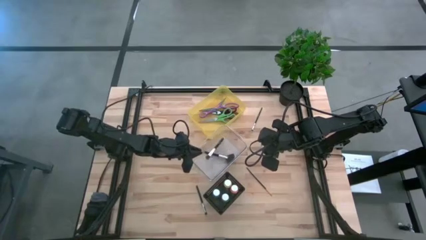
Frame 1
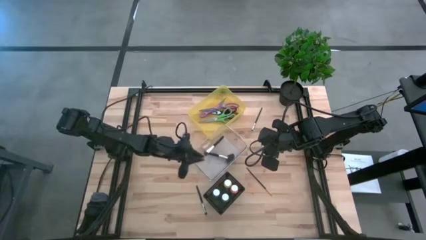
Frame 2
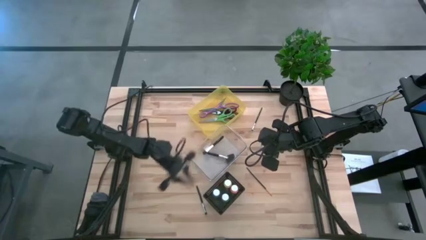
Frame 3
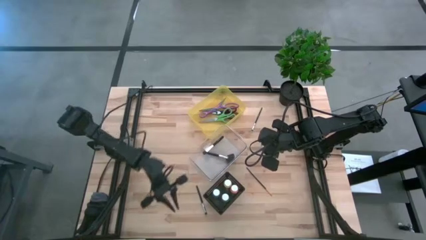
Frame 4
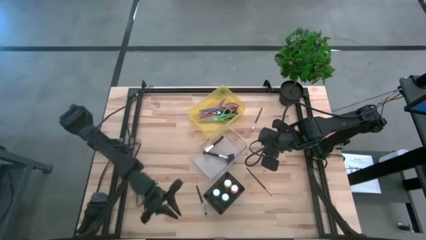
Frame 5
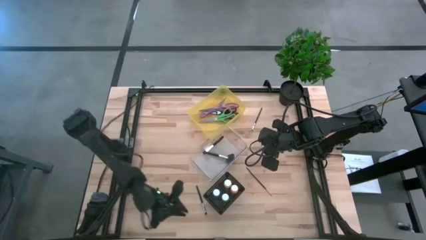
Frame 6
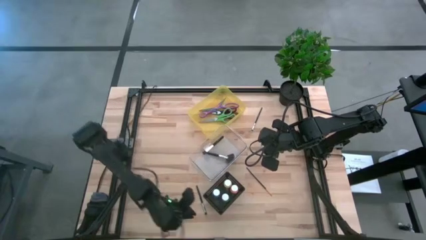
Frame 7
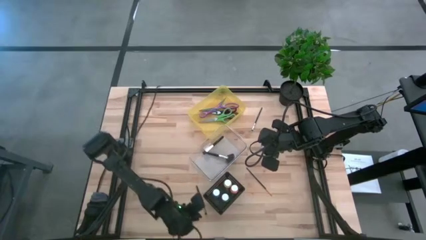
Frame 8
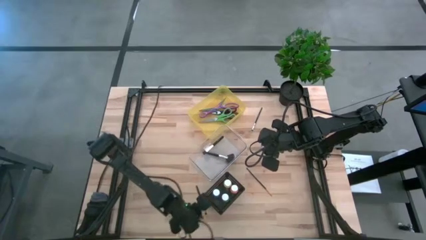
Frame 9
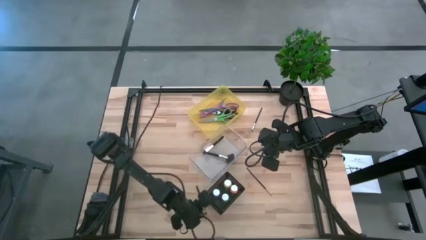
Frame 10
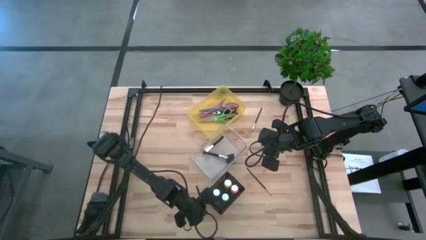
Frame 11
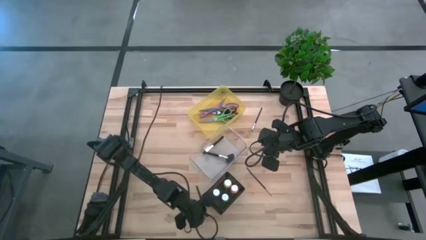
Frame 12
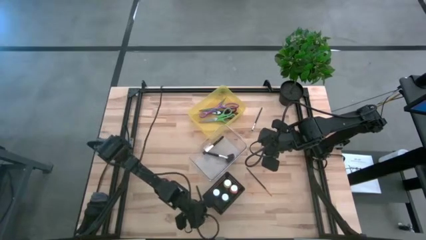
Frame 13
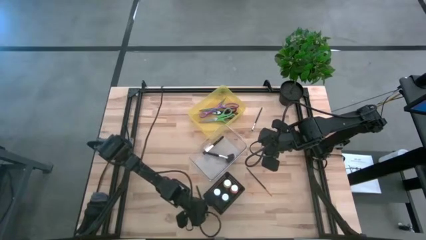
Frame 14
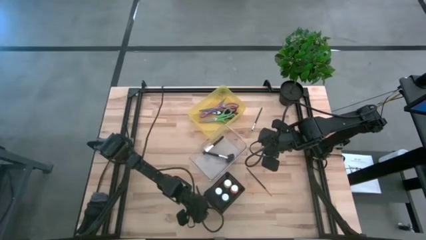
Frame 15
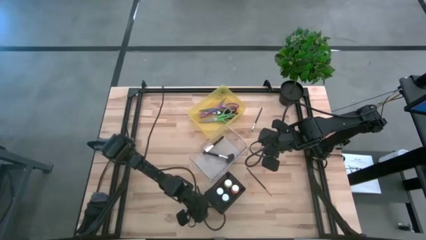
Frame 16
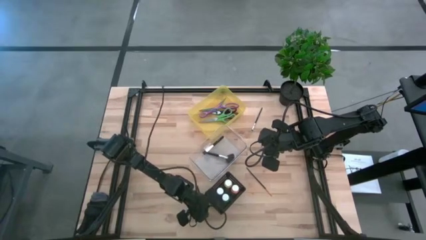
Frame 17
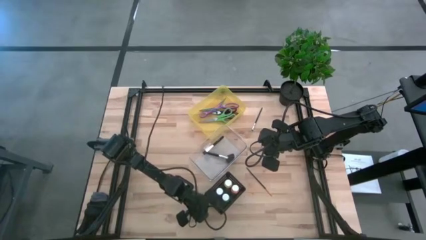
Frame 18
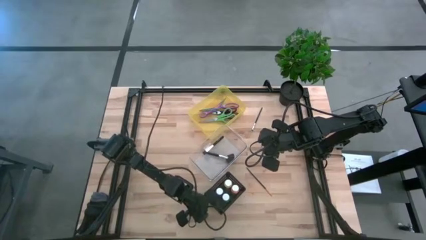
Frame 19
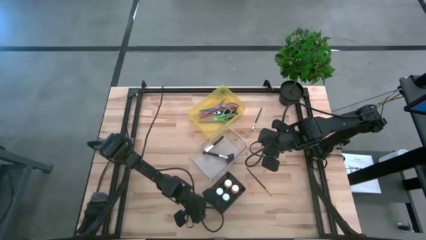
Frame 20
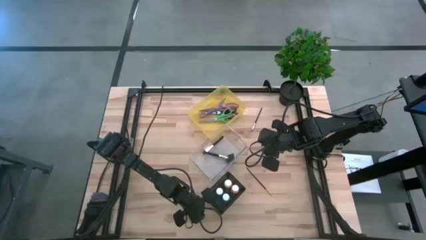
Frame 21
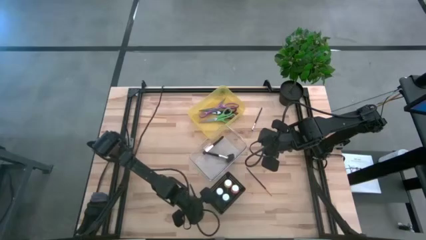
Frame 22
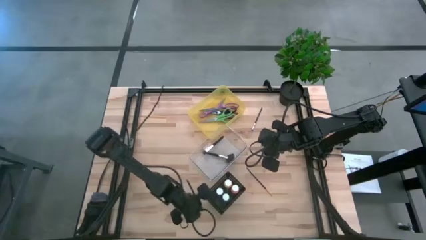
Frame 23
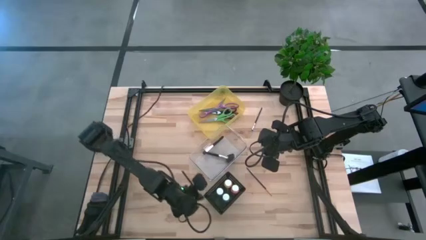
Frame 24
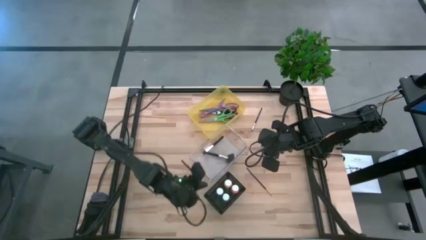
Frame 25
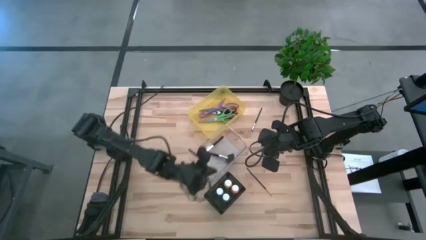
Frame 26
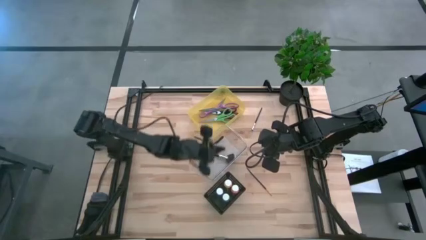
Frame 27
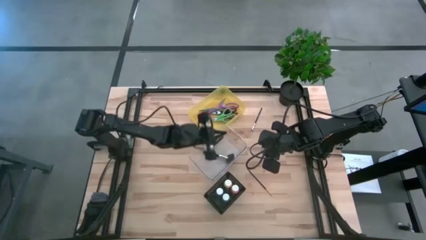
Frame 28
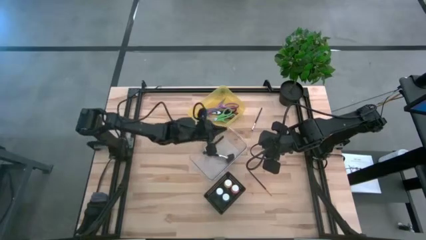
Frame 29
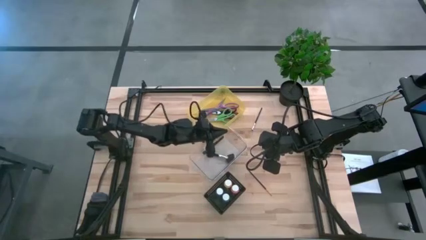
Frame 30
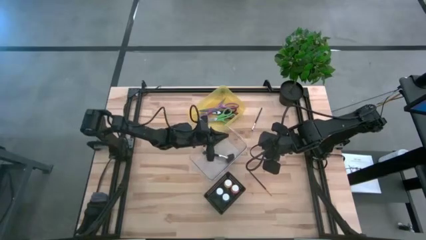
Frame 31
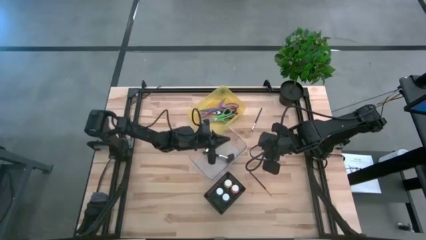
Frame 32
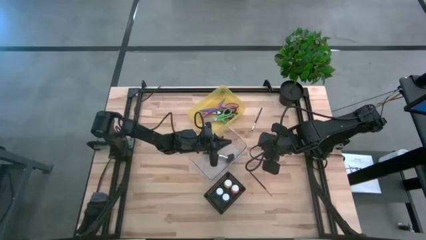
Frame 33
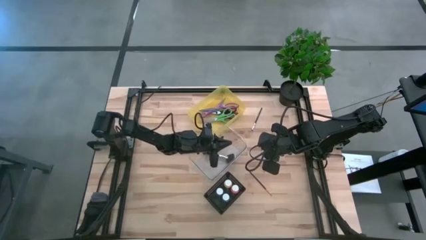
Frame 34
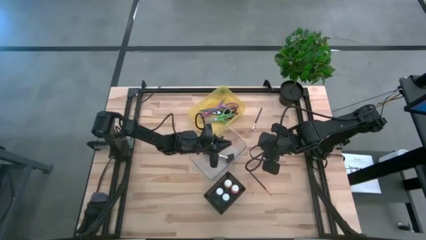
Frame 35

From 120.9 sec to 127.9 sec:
Task: Pick & Place Paint Supplies
Put the blush brush into the transparent bin

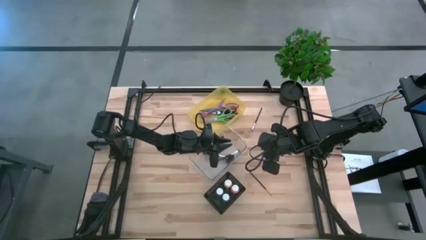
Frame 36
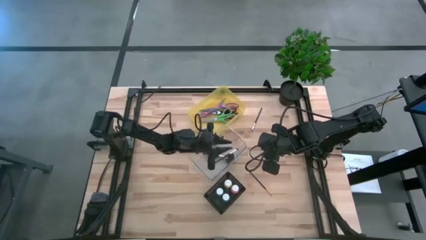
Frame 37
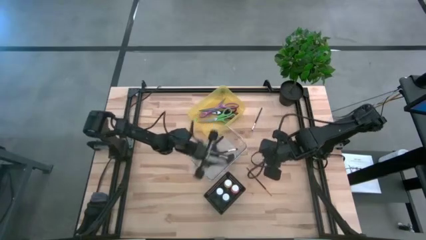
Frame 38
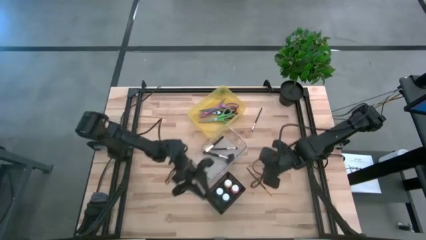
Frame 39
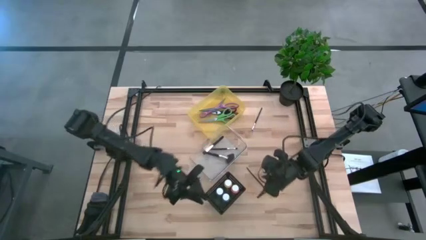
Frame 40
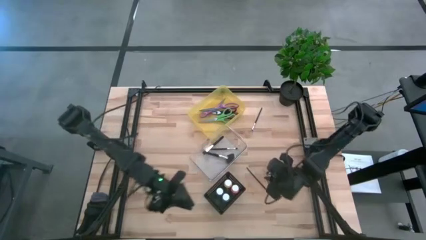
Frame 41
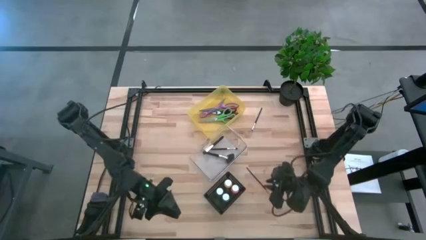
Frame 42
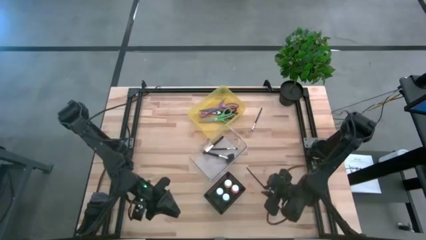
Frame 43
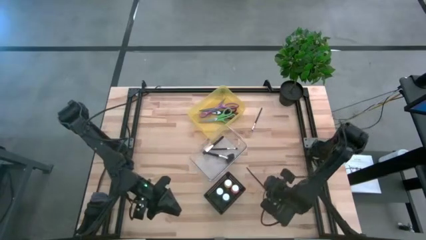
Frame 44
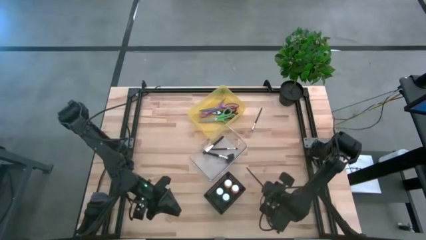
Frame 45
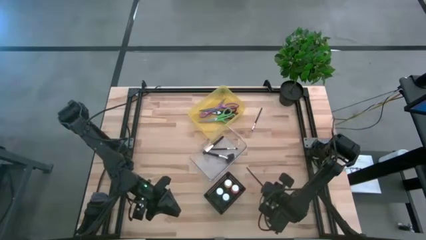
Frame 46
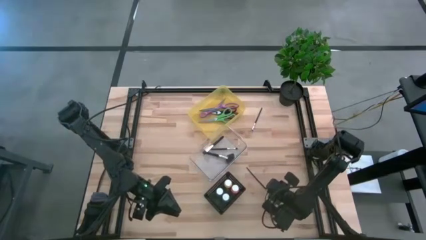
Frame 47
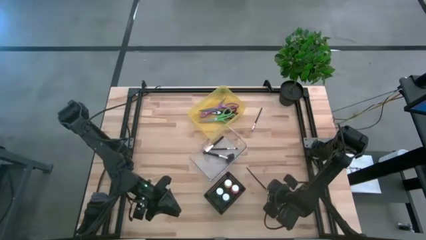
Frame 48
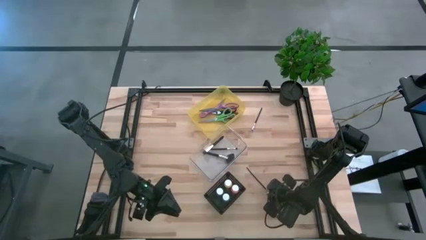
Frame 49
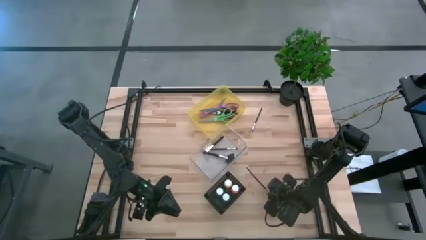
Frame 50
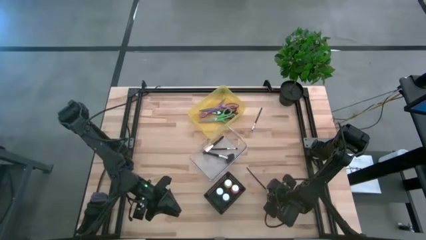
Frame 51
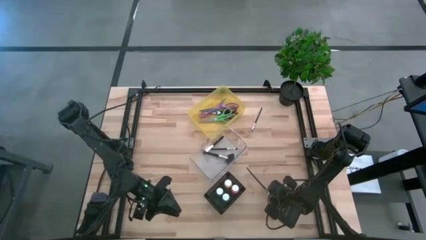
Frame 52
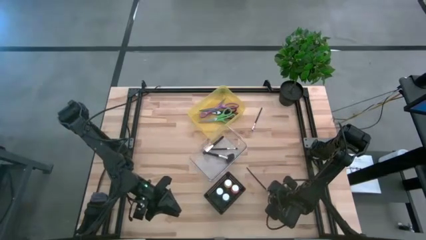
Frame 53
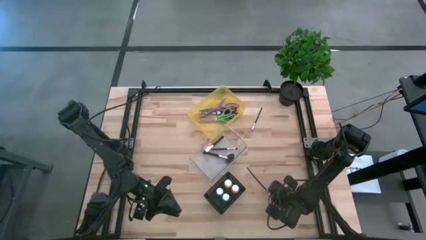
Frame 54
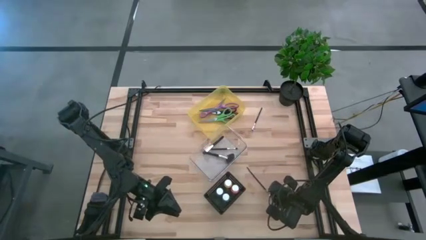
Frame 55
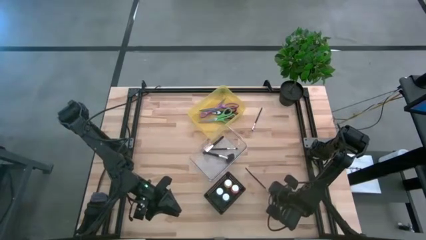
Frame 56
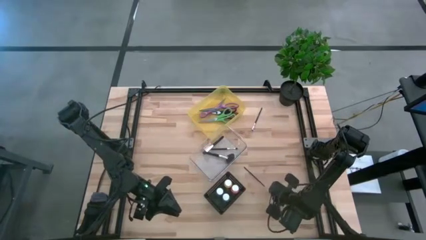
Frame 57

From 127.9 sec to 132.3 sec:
Put the paint brush into the transparent bin

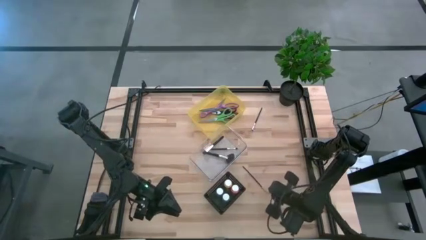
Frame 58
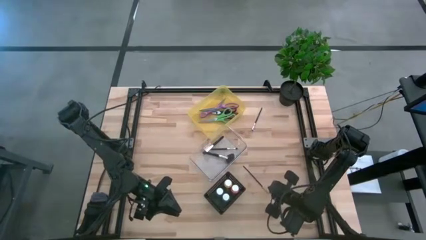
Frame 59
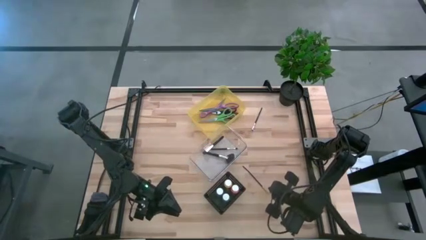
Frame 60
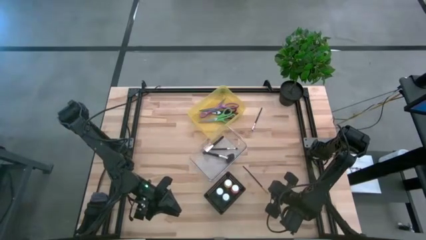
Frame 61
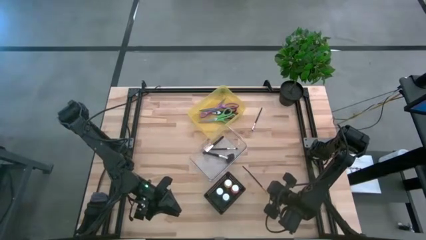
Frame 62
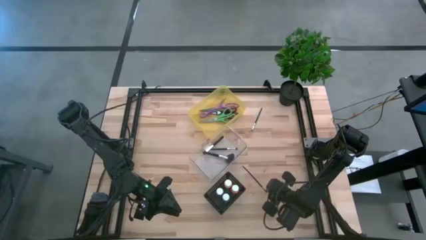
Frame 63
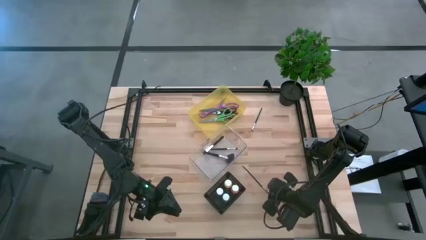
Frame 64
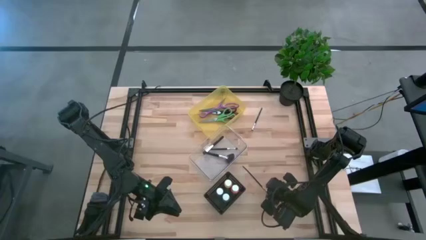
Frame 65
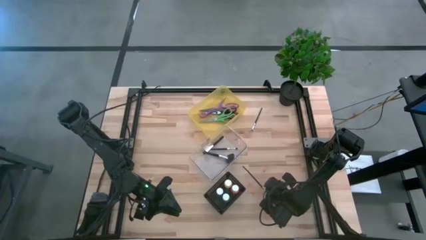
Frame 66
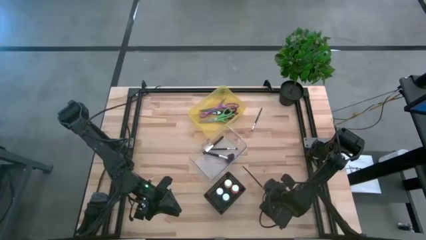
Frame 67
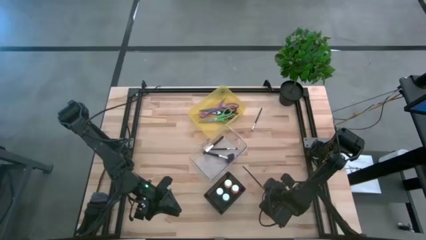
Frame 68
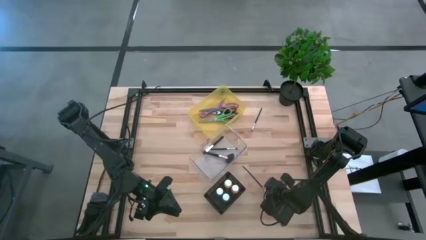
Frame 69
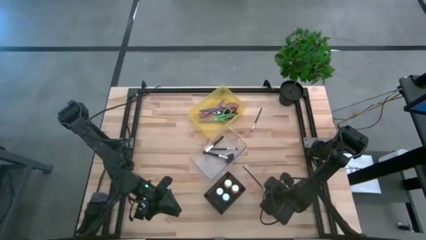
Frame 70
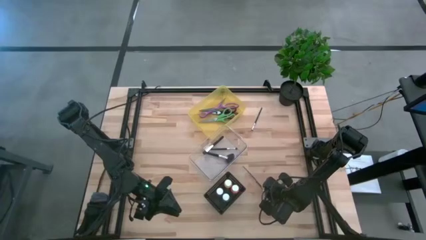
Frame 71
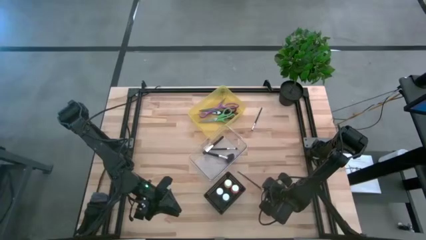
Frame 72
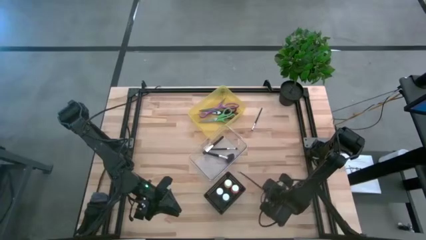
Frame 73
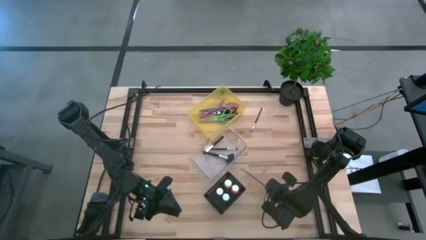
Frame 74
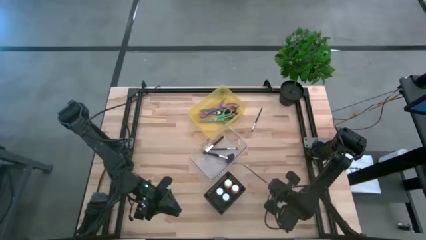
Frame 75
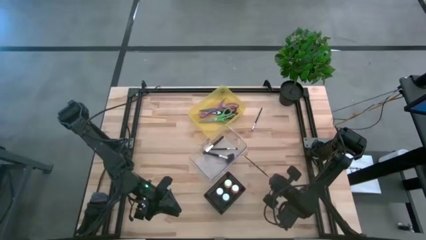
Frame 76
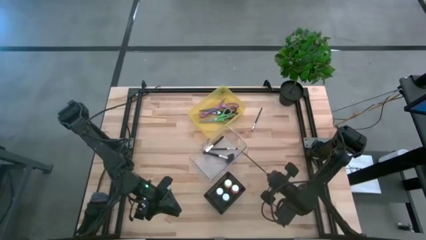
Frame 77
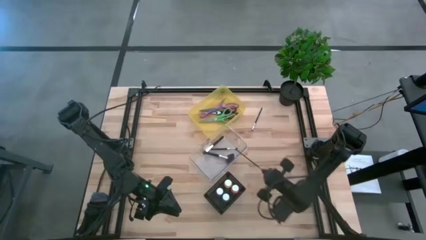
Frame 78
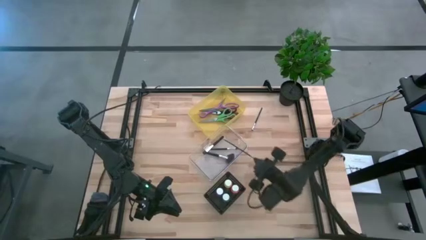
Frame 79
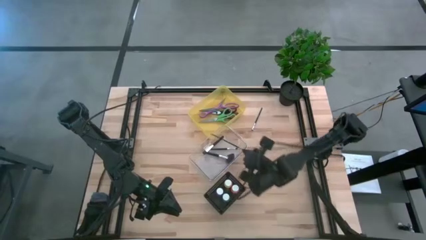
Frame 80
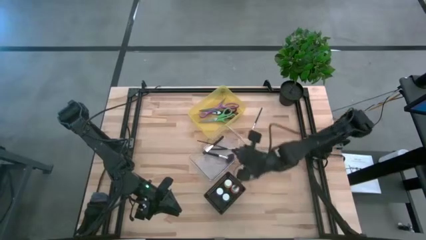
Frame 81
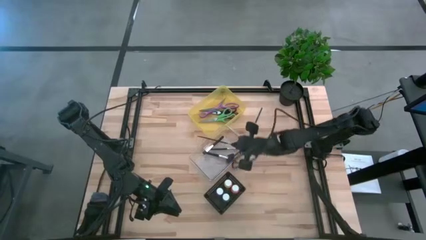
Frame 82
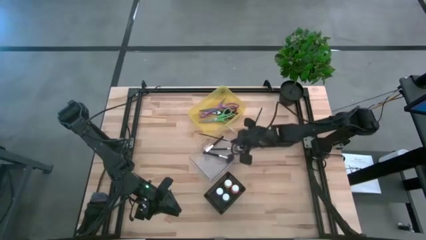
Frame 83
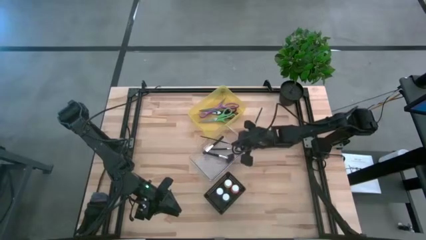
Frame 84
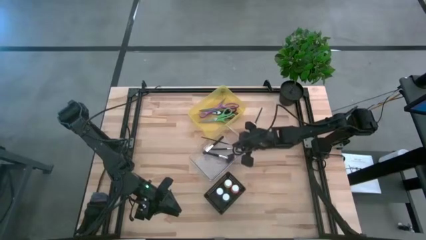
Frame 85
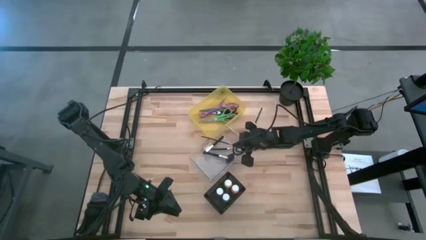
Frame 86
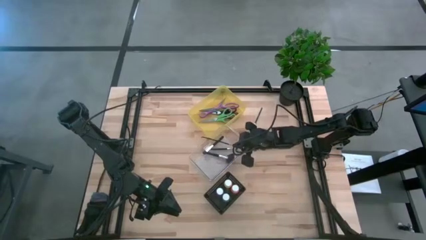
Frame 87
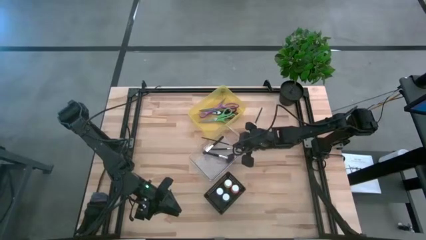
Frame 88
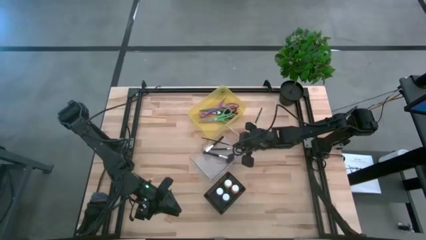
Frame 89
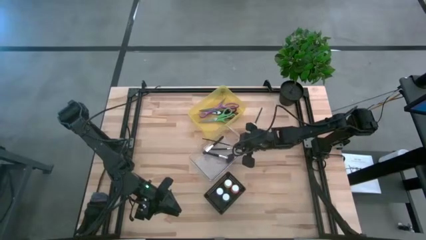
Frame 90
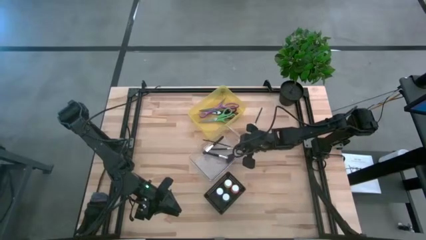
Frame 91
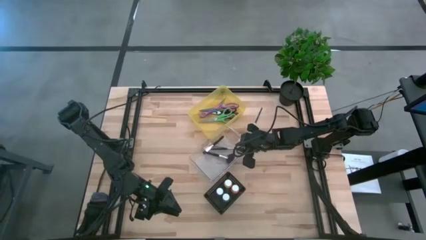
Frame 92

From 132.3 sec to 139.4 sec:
Put the paint brush into the transparent bin
